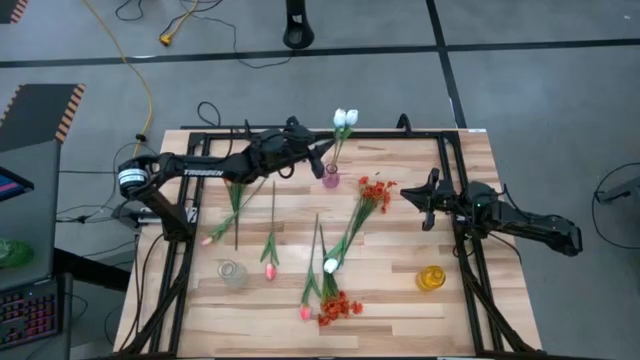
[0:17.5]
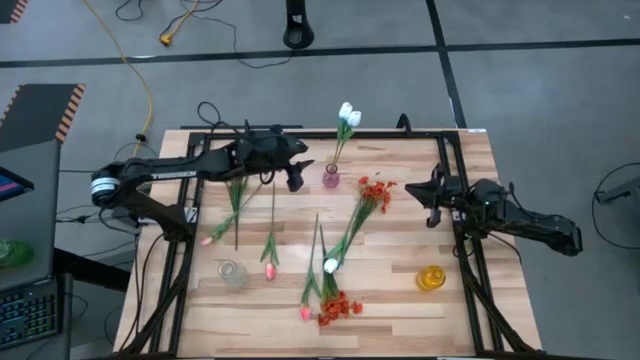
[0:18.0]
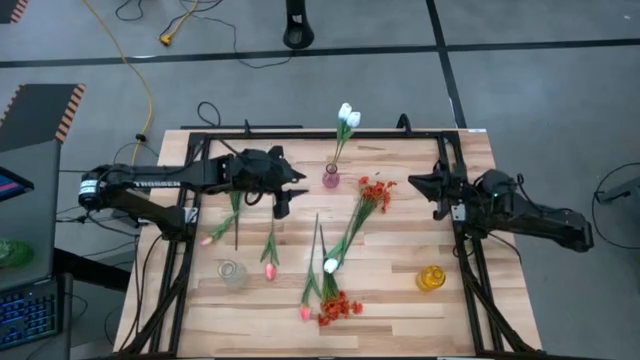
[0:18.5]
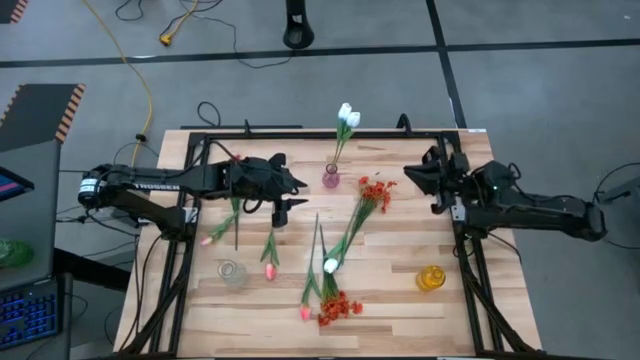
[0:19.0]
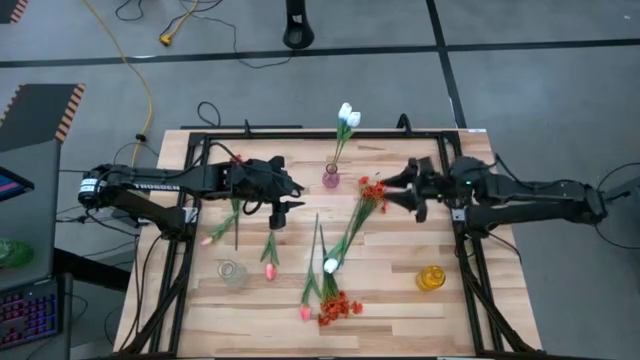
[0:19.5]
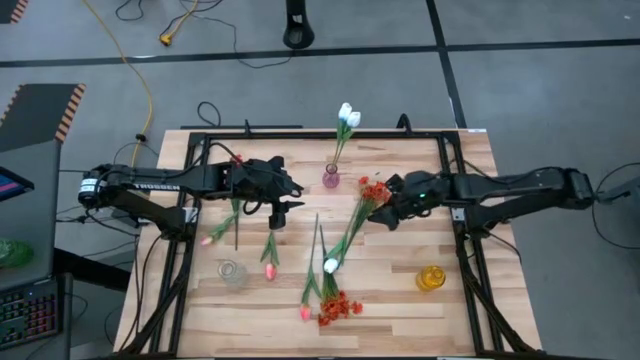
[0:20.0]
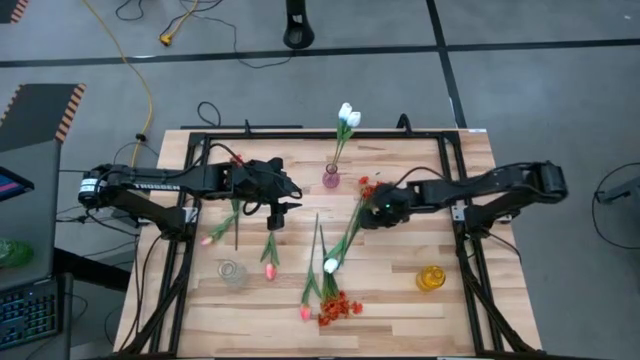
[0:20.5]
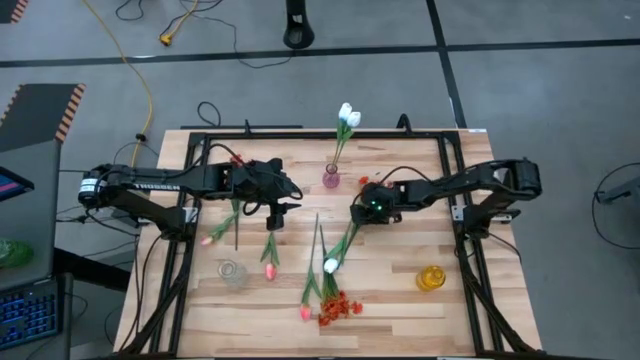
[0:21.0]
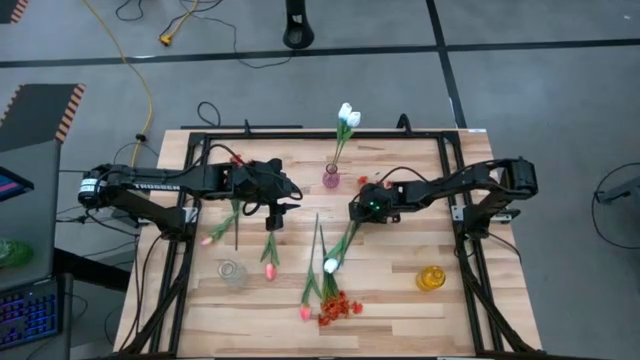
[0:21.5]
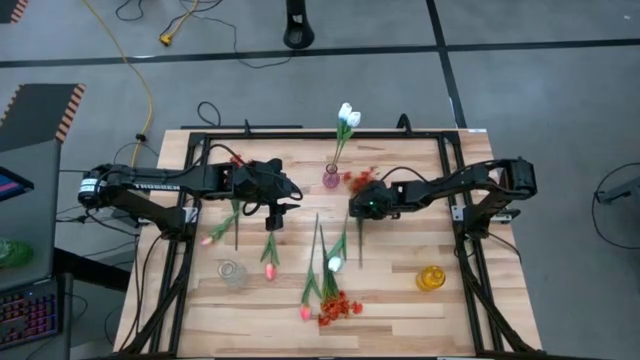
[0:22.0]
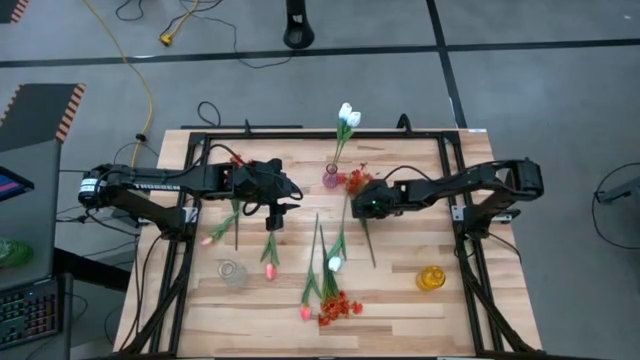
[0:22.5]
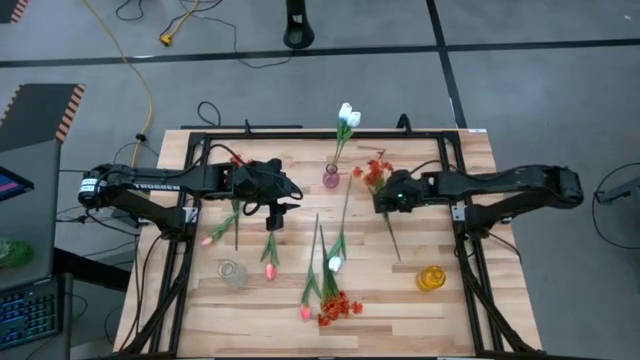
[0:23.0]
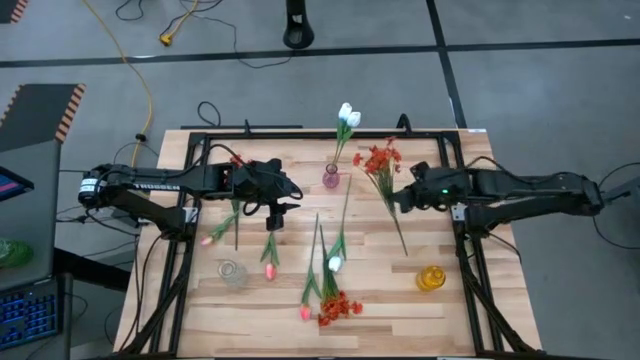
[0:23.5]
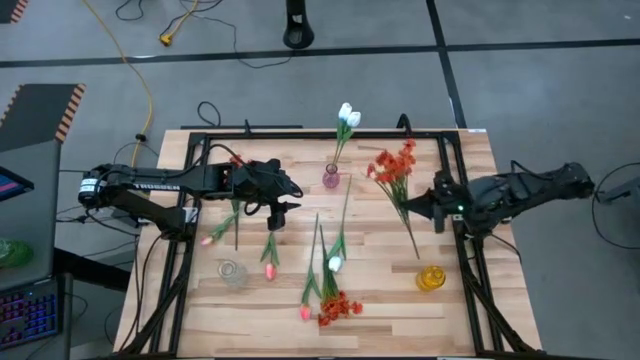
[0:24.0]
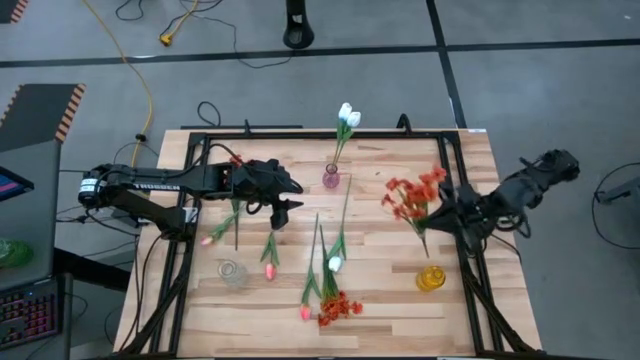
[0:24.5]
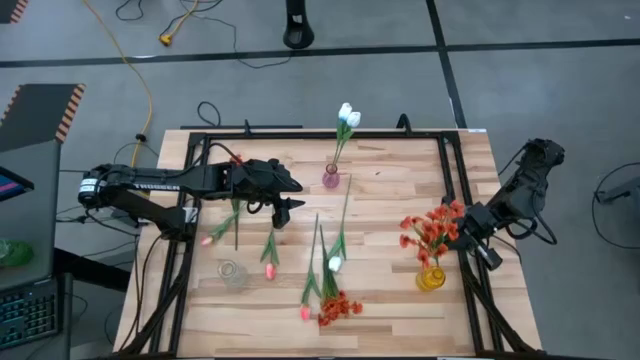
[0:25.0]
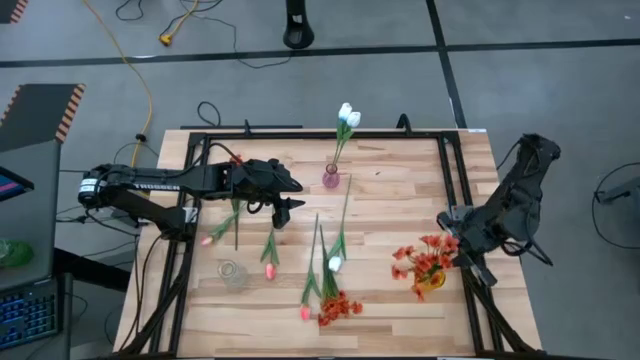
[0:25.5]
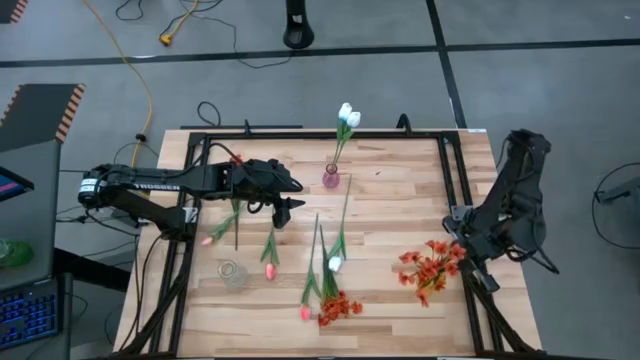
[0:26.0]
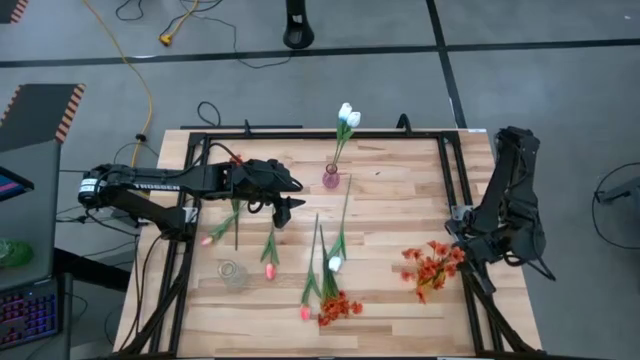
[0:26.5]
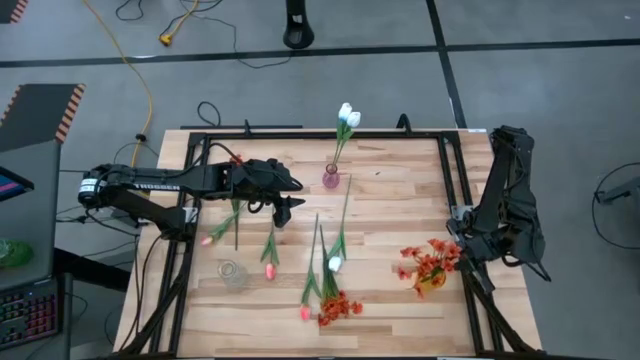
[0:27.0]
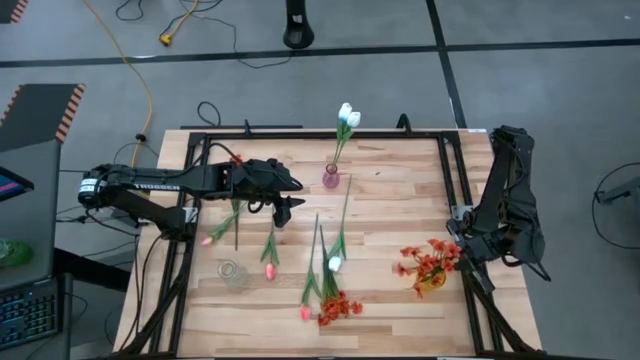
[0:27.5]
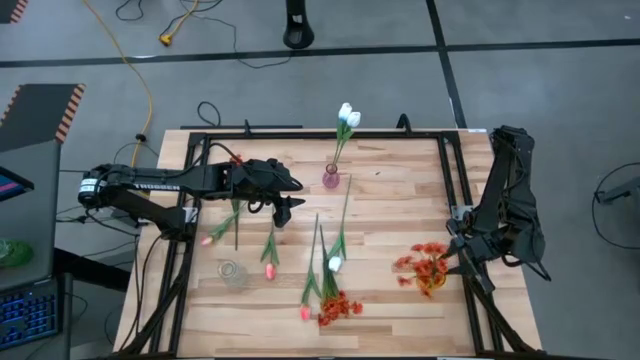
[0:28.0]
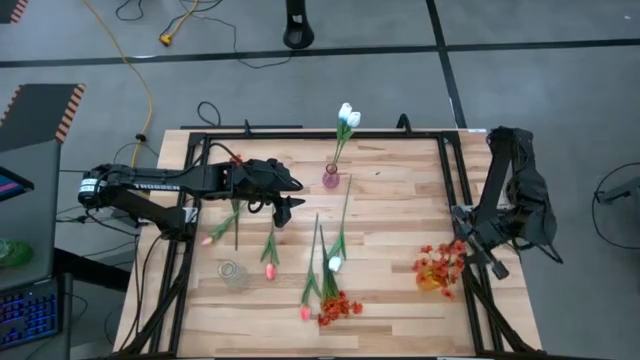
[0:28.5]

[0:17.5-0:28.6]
Task: Sort flowers into vase by color
Put the right orange flower bouquet into the yellow vase

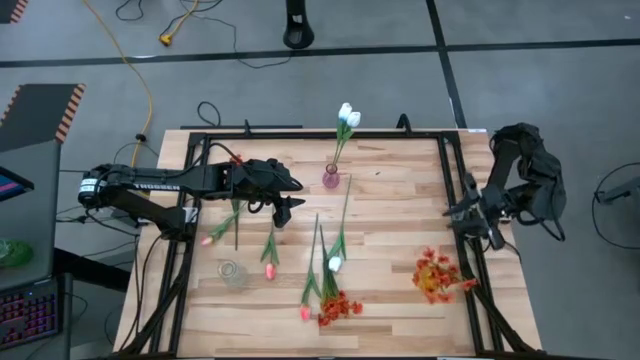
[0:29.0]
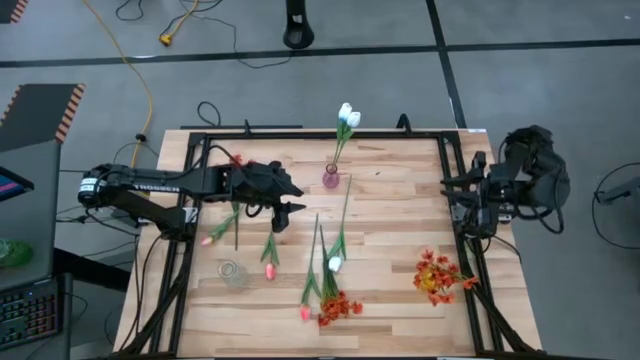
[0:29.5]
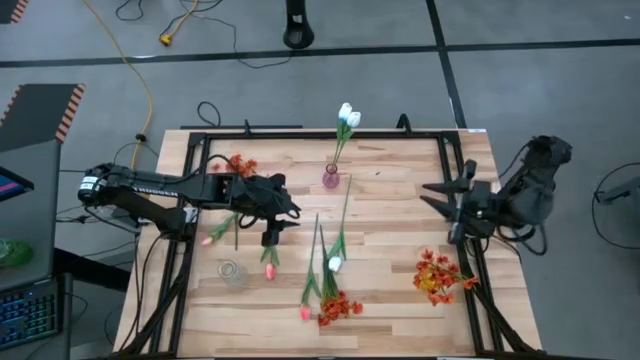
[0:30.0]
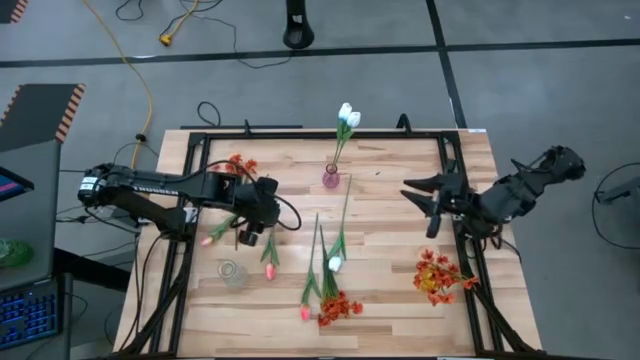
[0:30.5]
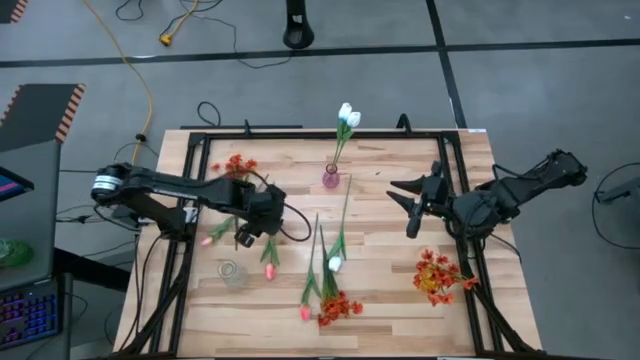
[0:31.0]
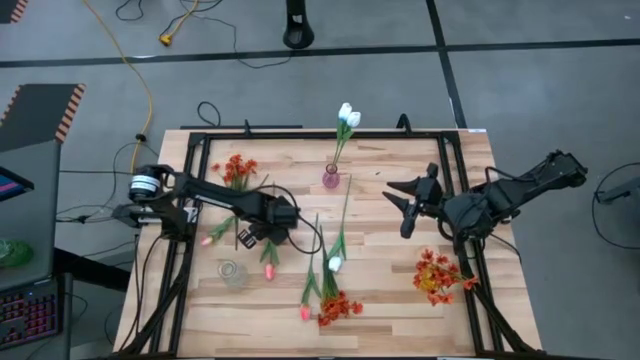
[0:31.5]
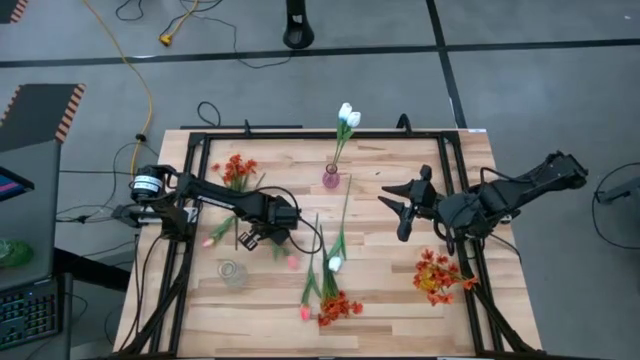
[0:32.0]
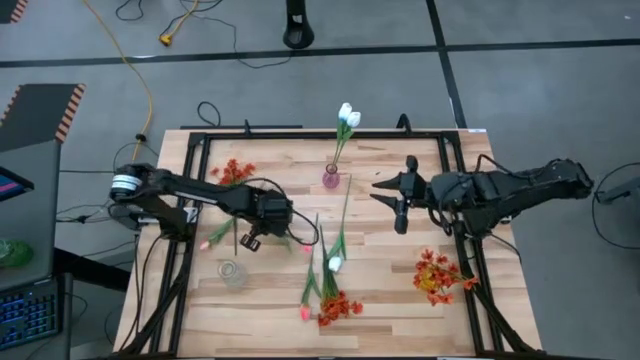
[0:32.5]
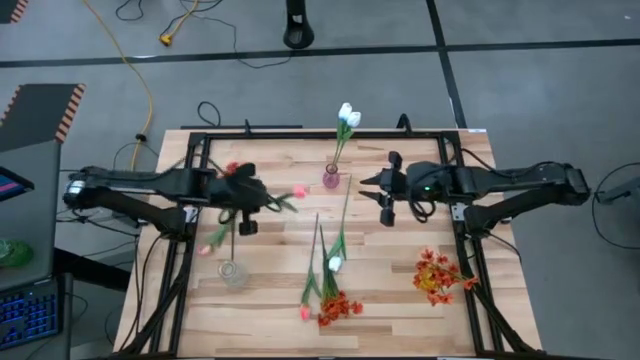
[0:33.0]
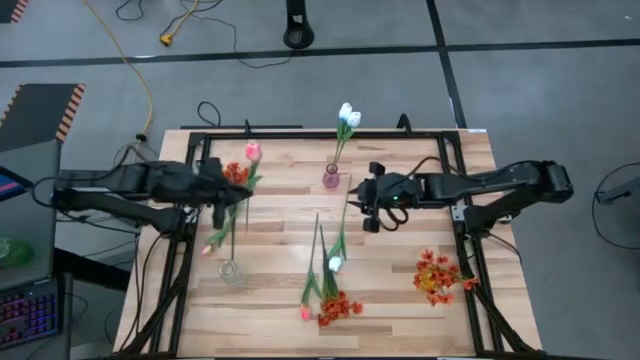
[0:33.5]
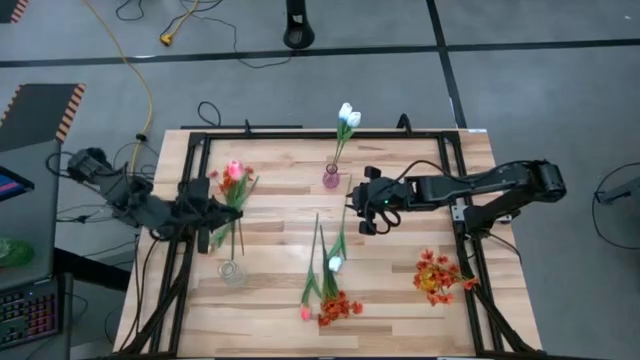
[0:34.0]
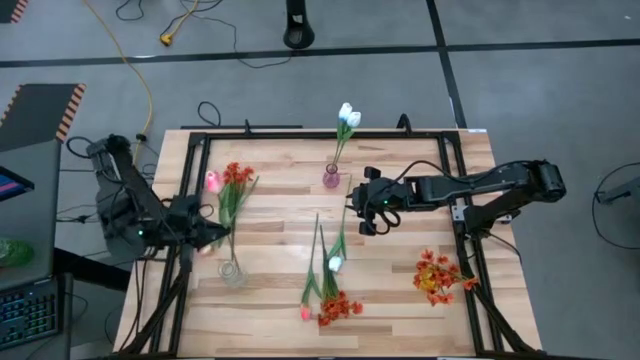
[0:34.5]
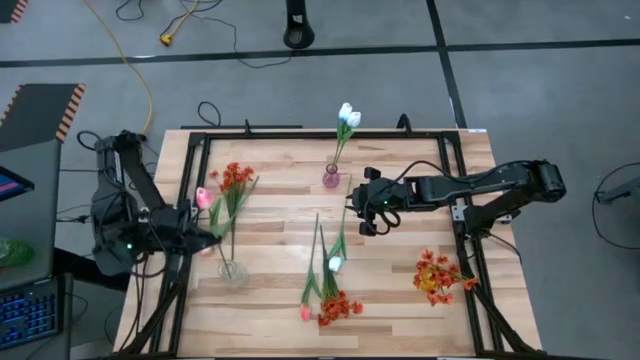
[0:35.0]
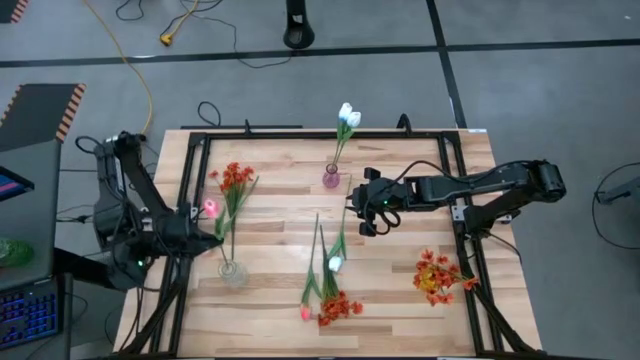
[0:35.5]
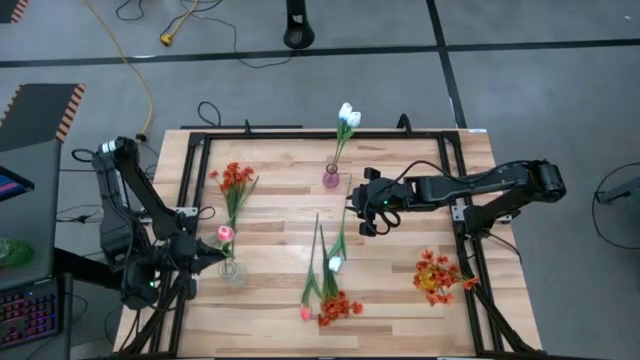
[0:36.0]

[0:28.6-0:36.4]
Put the middle pink flower into the transparent vase

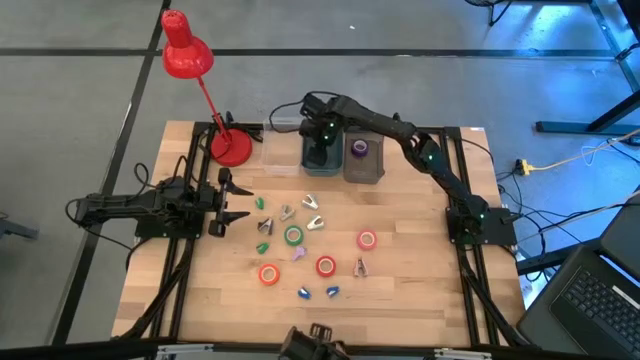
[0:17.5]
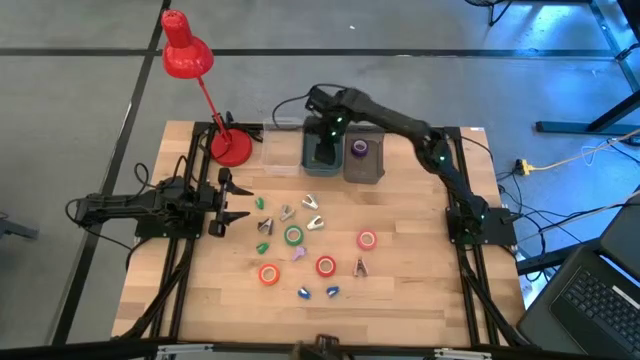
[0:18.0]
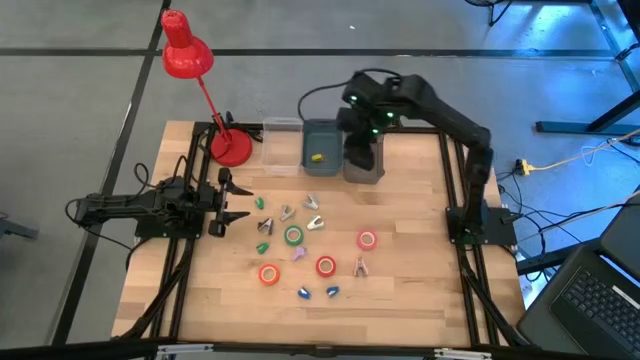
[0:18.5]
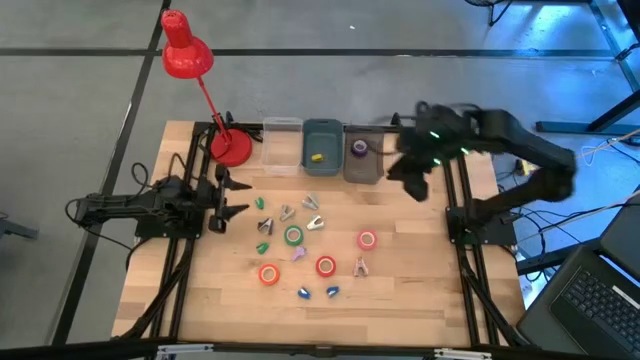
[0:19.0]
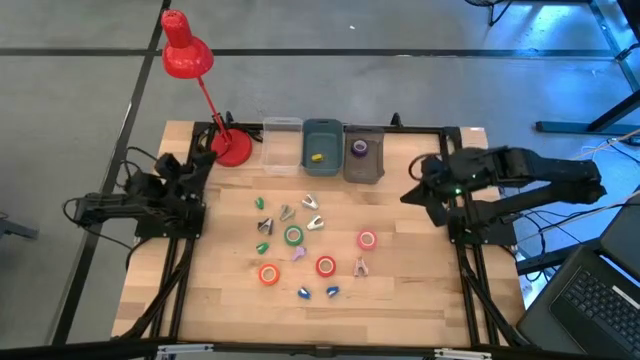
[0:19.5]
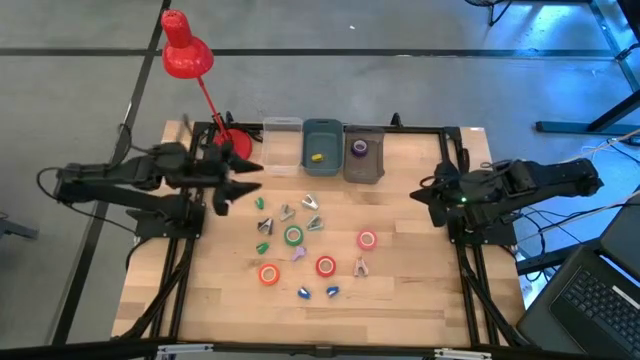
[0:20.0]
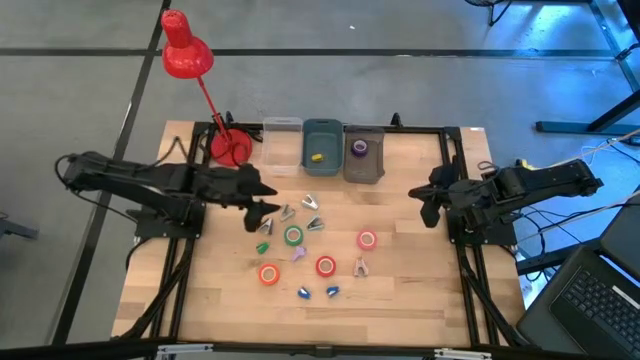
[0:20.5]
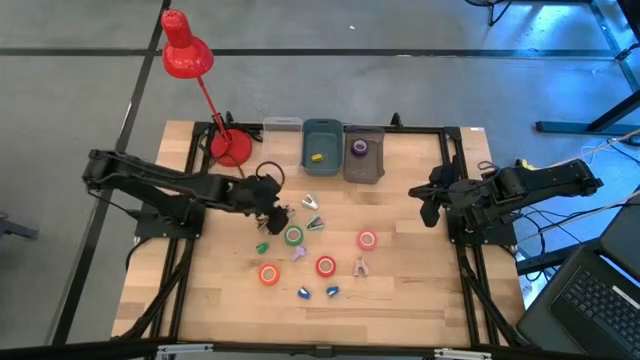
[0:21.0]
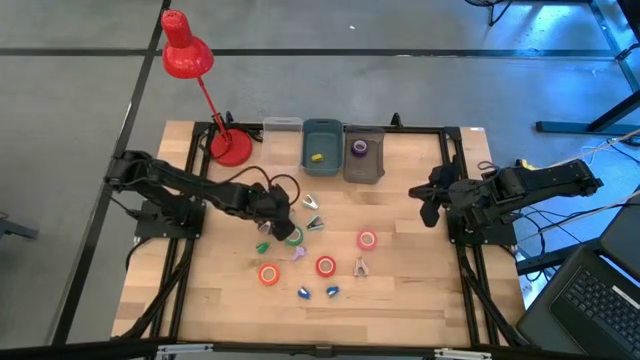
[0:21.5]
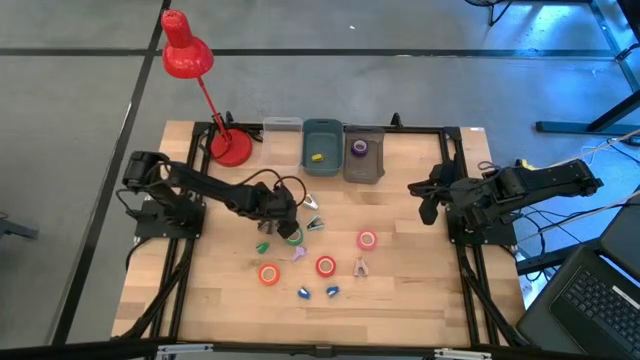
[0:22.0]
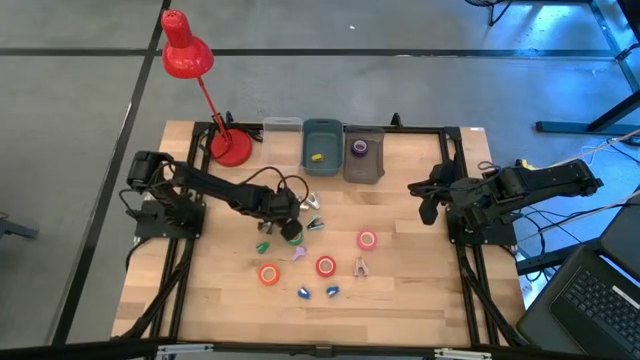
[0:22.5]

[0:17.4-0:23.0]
Task: Pick and place Stapler, Stapler remover, tape
Put the gray staple remover into the transparent bin
